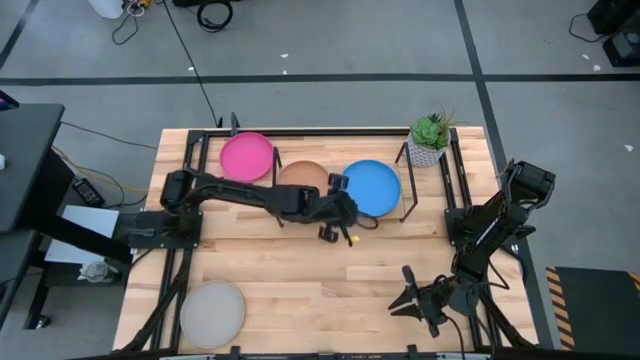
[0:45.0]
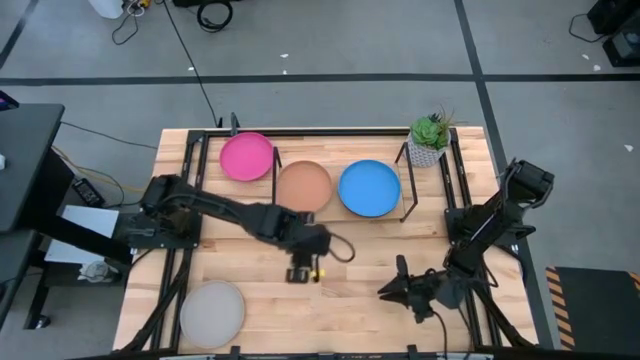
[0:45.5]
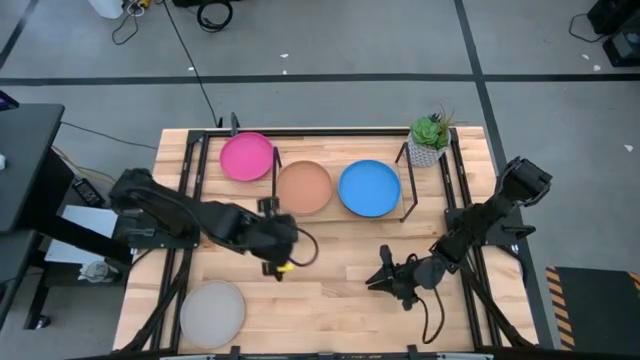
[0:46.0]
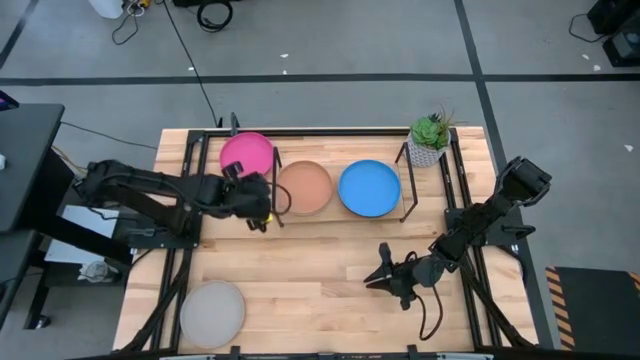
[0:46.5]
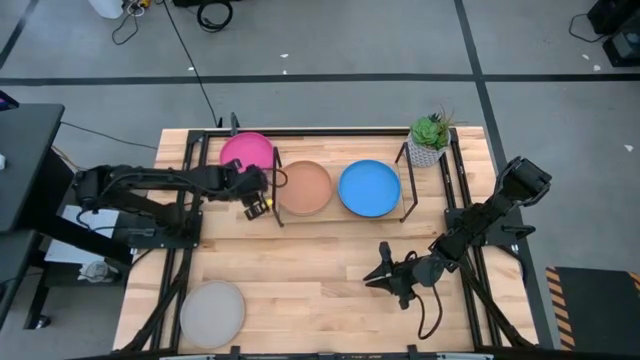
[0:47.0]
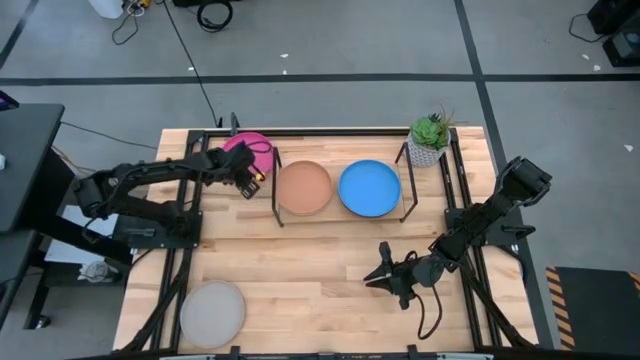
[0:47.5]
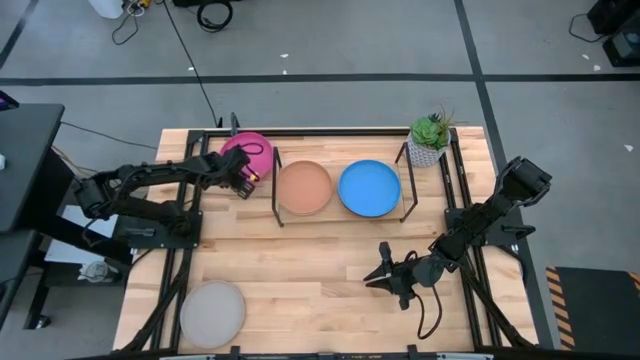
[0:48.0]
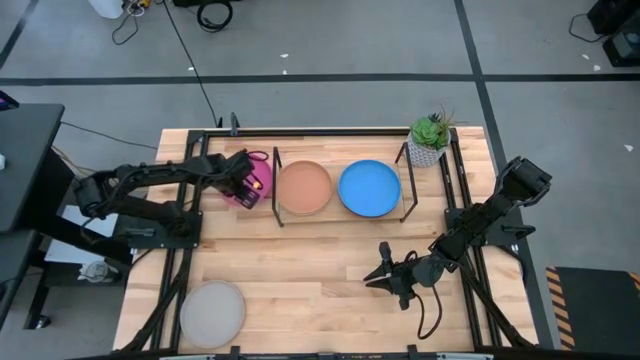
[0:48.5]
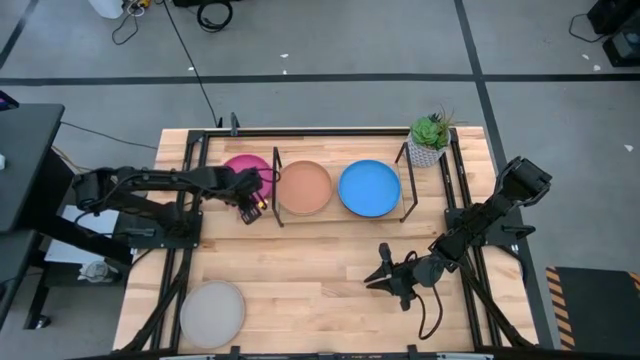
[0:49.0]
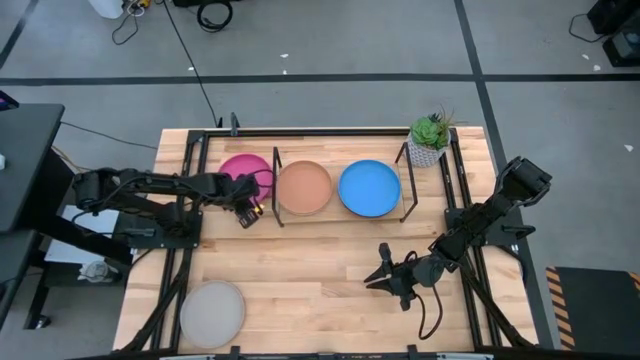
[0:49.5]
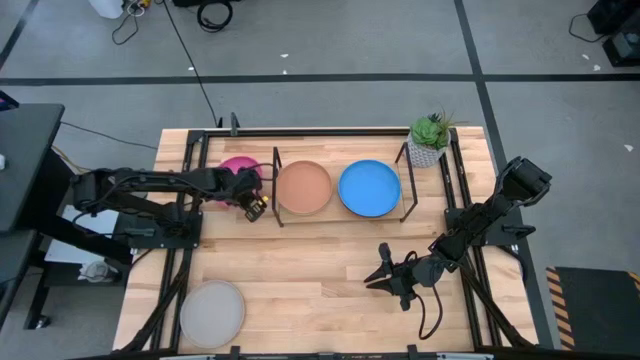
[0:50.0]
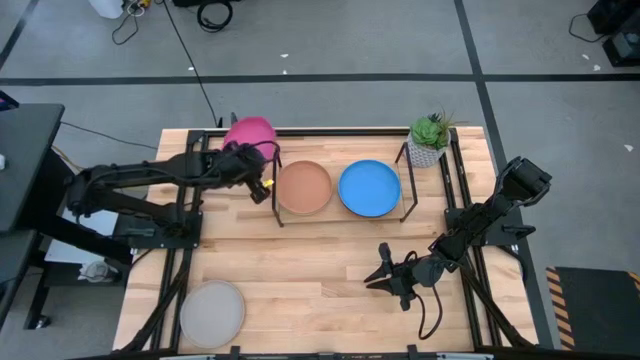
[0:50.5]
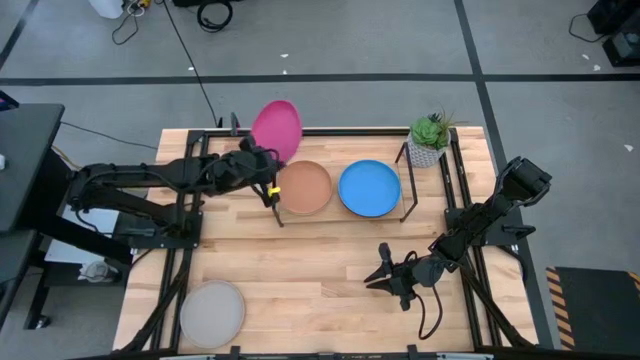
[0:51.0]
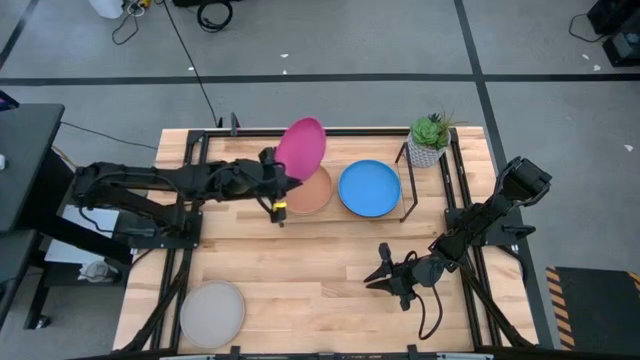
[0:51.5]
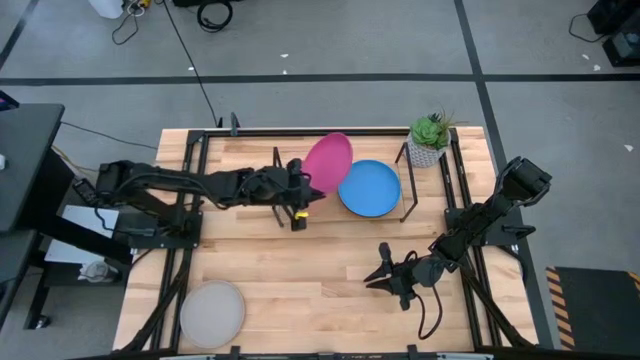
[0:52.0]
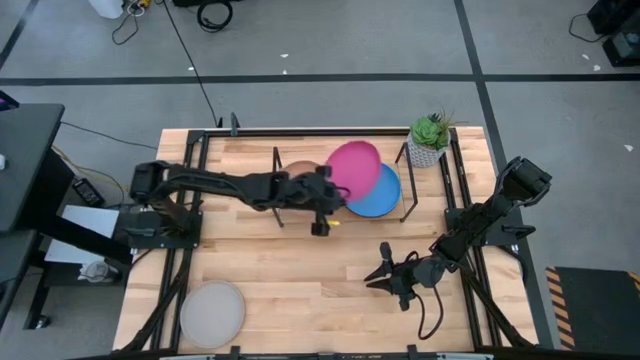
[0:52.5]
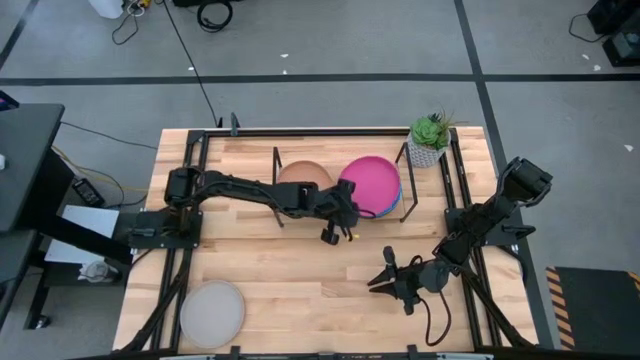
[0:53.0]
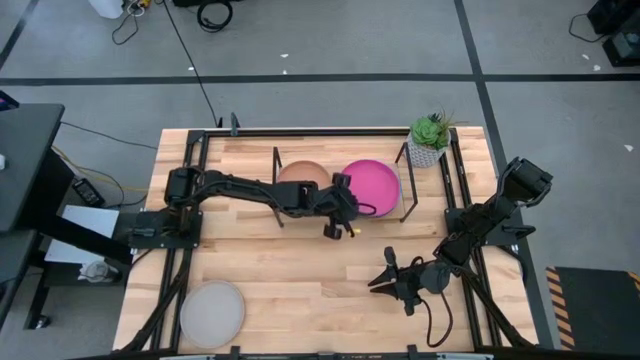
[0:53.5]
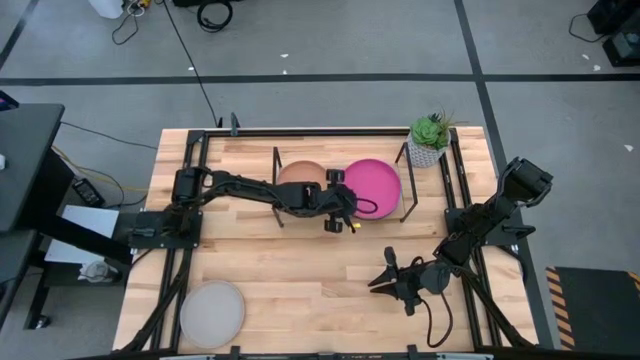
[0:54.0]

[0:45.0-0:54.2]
Task: Place and stack plates onto a shelf
Stack the pink plate on top of the blue plate on the shelf

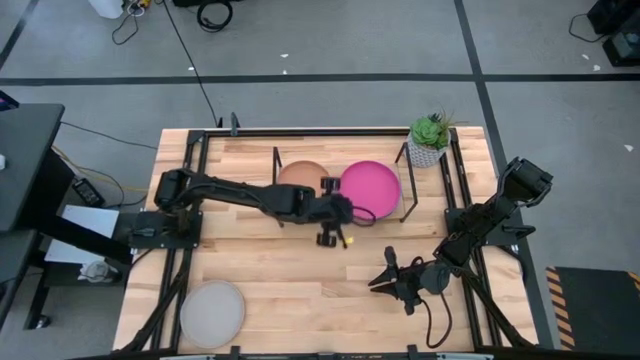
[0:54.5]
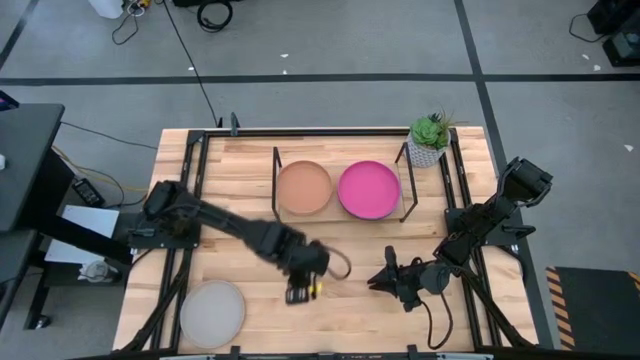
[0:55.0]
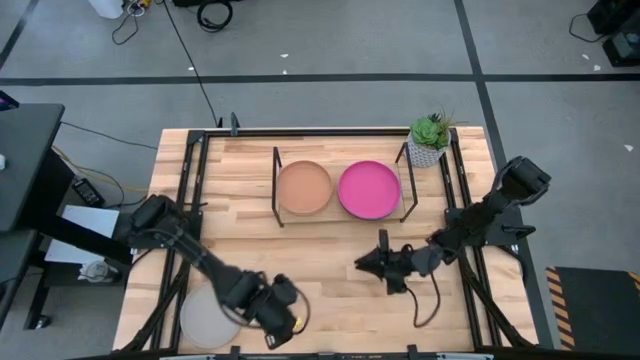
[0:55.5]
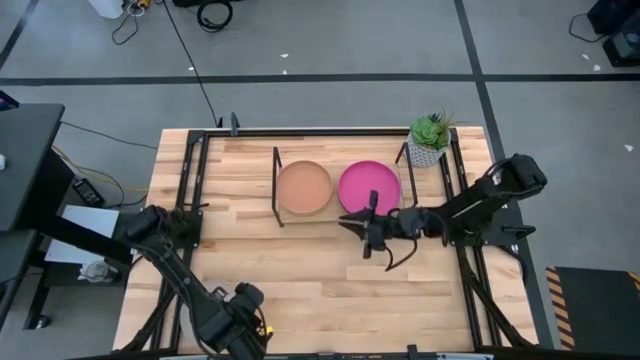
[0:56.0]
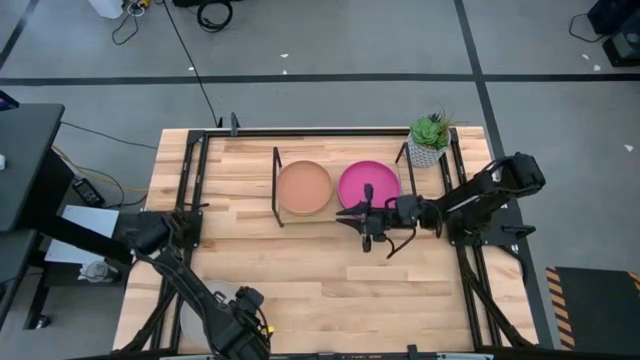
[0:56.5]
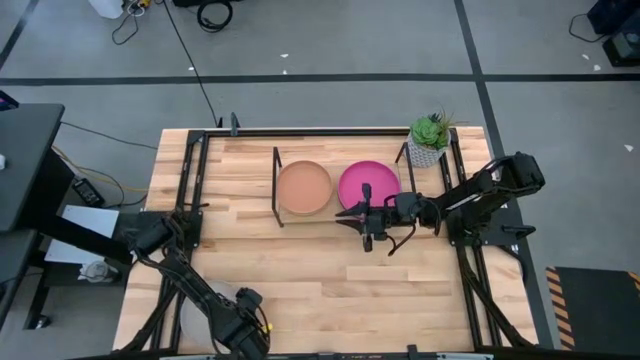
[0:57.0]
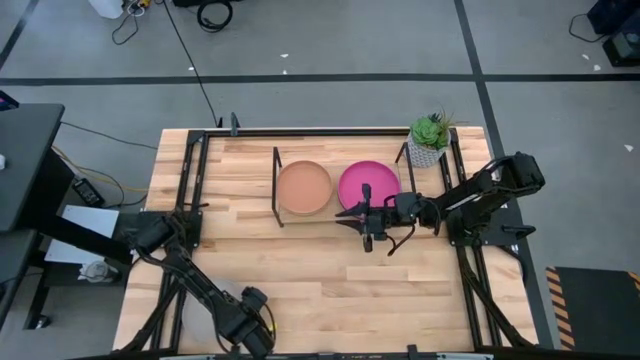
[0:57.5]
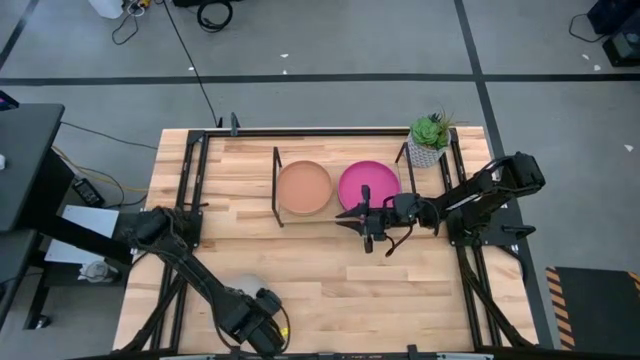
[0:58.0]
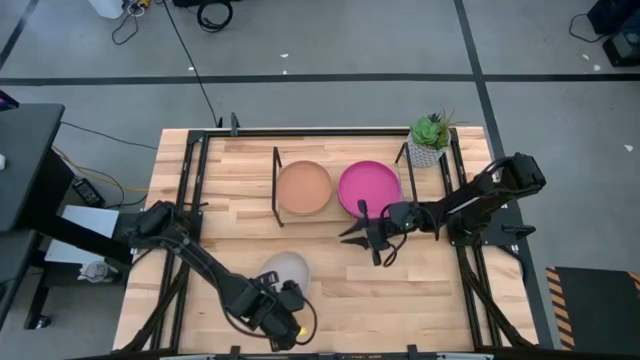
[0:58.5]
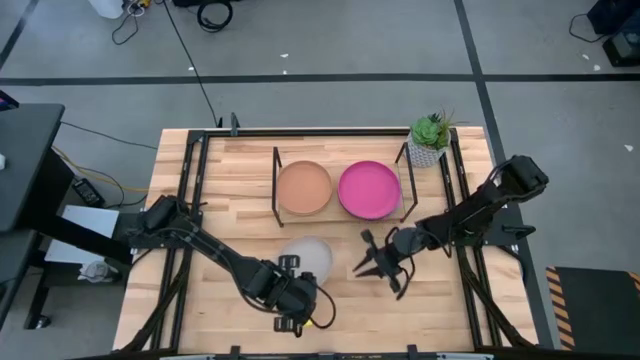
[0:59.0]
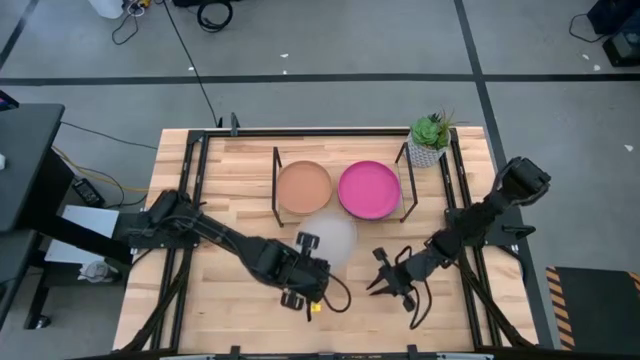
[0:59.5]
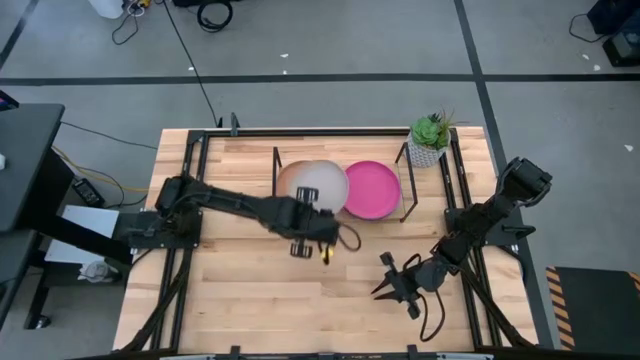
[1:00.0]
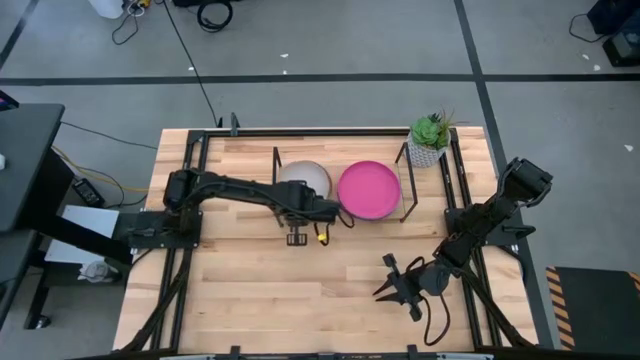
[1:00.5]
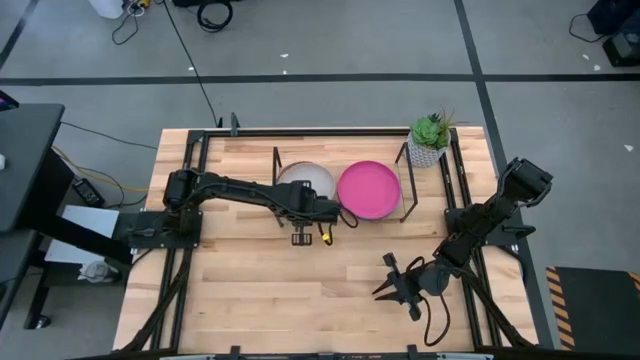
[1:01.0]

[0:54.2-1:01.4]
Stack the gray plate on top of the brown plate on the shelf

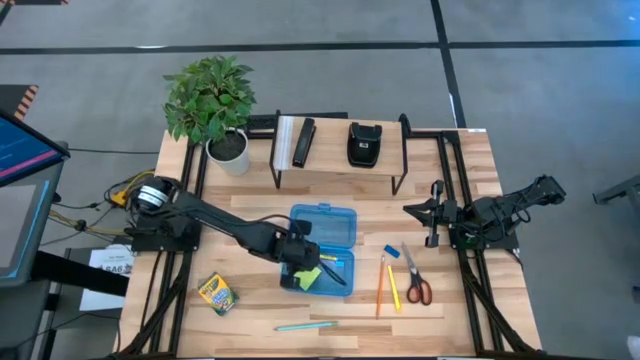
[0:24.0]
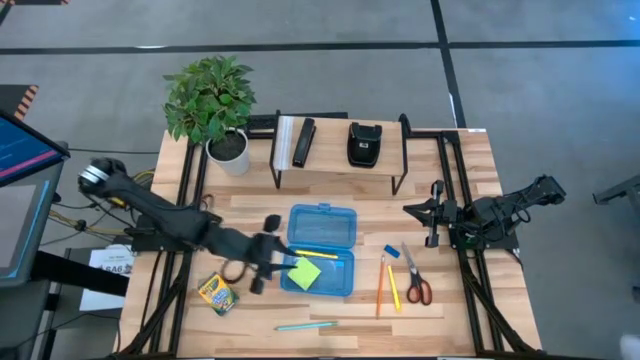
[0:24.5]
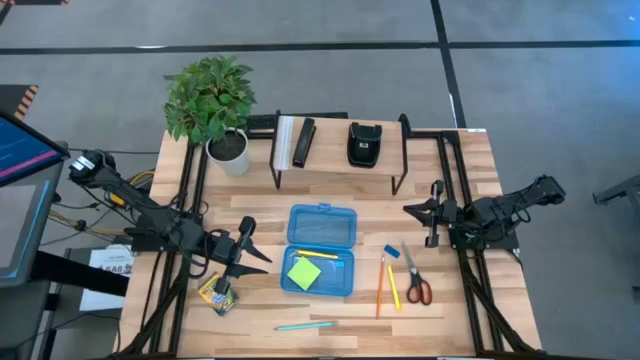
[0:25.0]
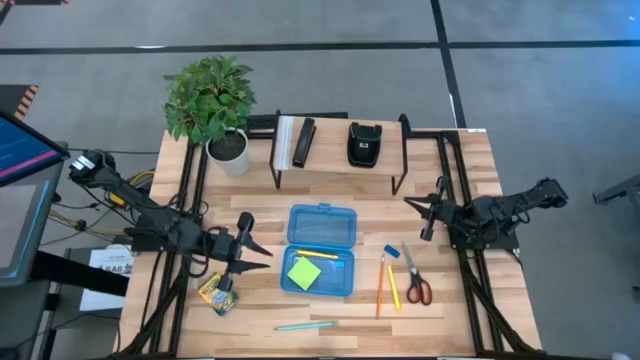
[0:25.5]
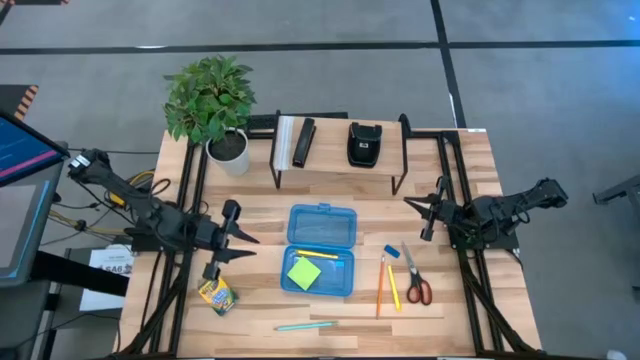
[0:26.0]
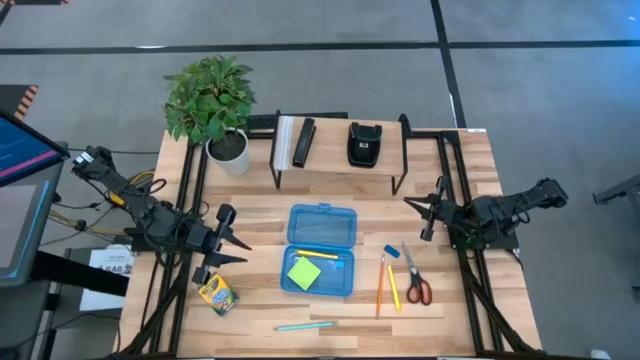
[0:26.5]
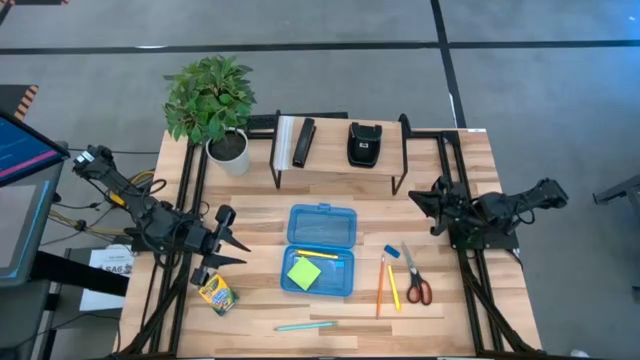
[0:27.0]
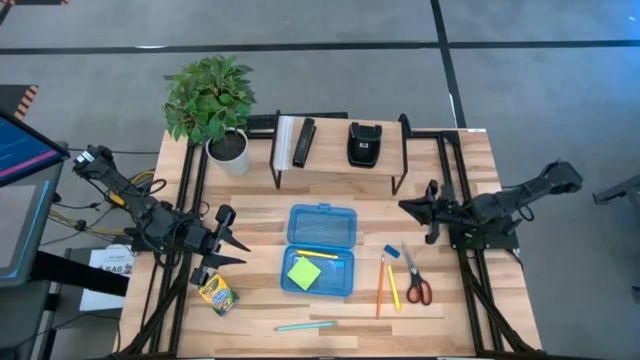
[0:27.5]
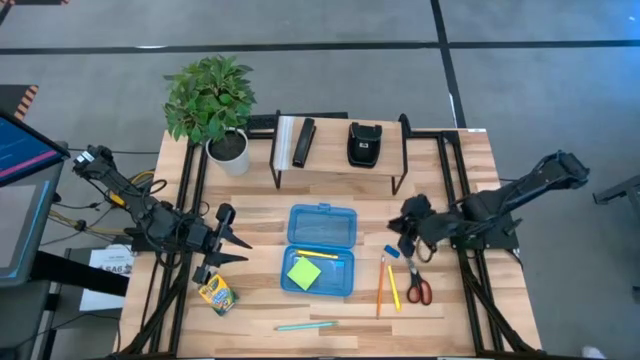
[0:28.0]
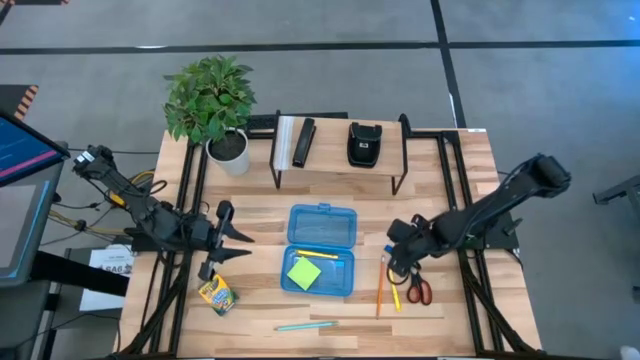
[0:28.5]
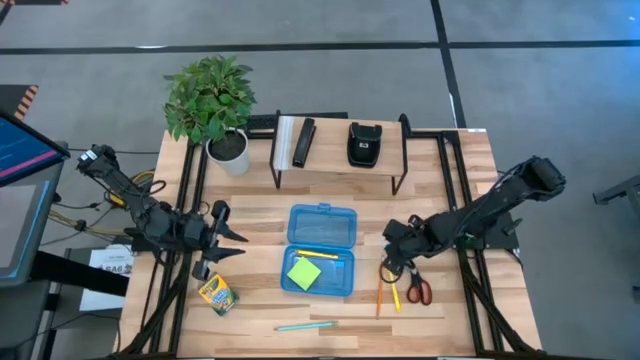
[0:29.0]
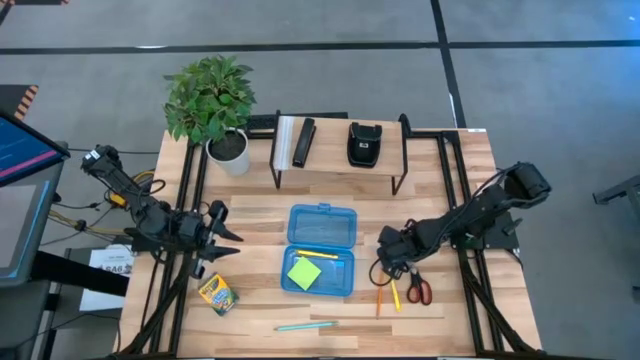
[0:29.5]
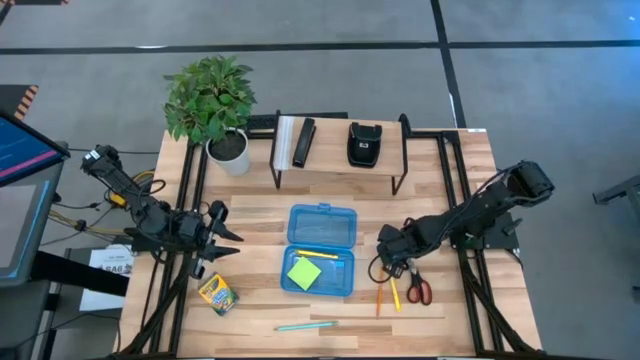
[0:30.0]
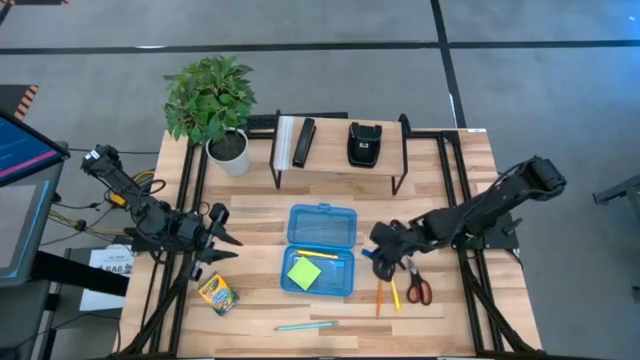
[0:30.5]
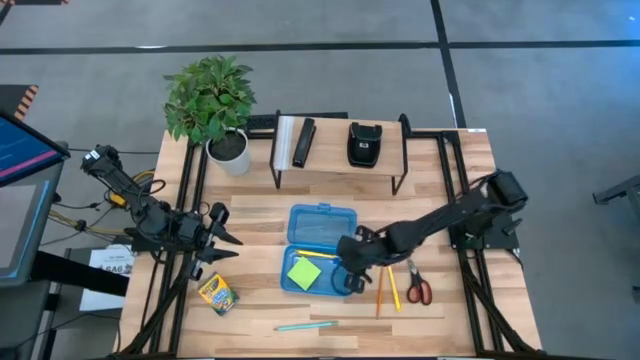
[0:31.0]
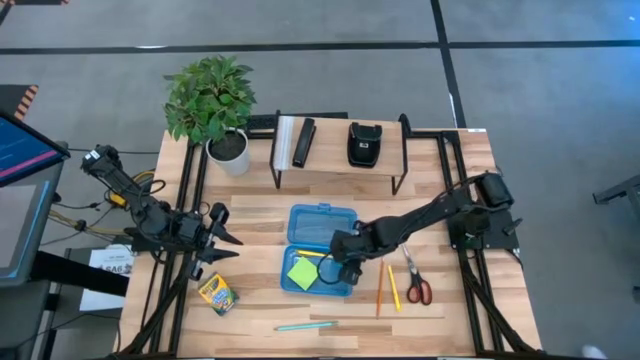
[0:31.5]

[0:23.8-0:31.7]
Task: Pack school essentials
Put the blue eraser into the blue supply box
